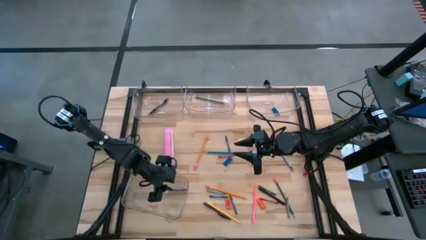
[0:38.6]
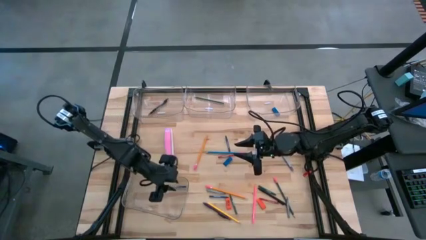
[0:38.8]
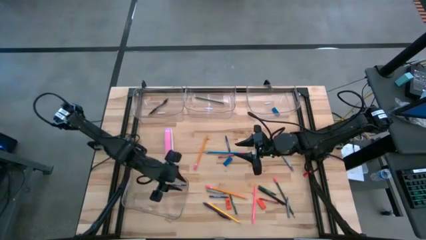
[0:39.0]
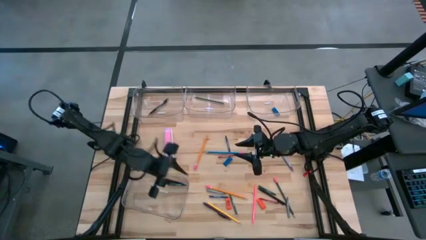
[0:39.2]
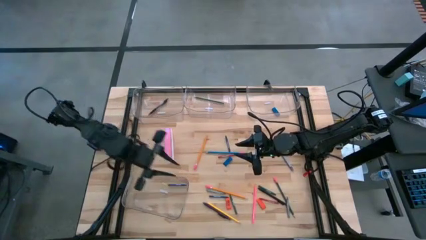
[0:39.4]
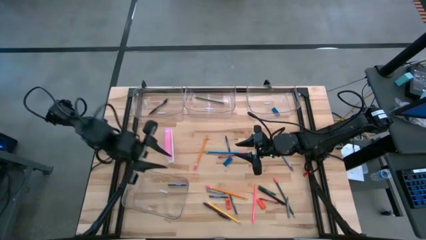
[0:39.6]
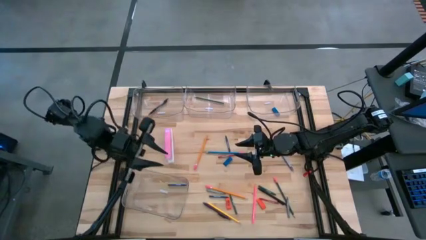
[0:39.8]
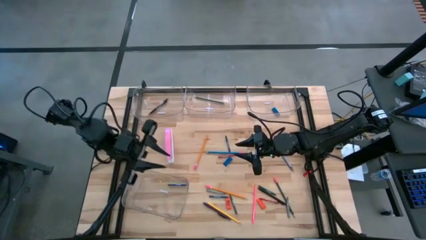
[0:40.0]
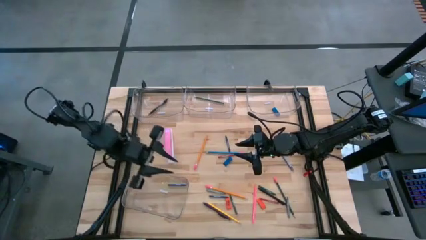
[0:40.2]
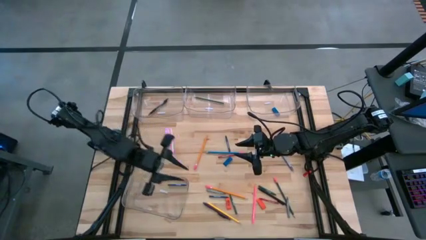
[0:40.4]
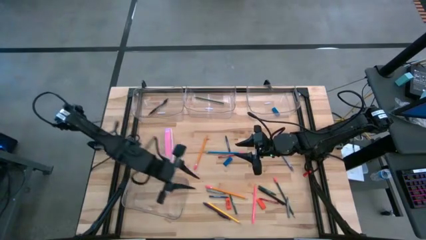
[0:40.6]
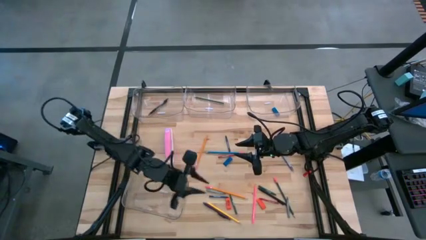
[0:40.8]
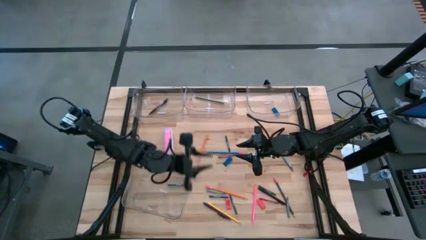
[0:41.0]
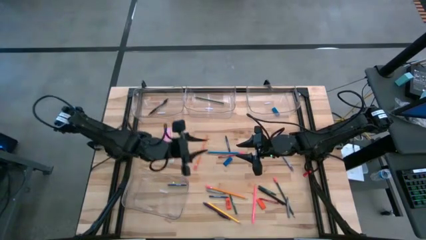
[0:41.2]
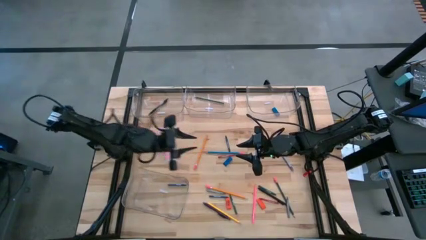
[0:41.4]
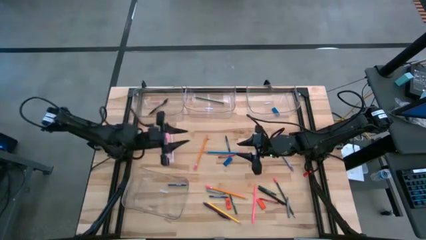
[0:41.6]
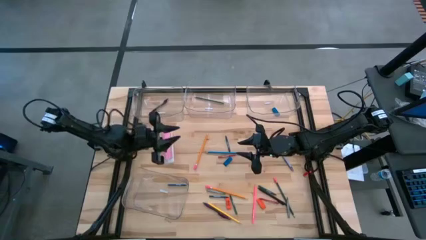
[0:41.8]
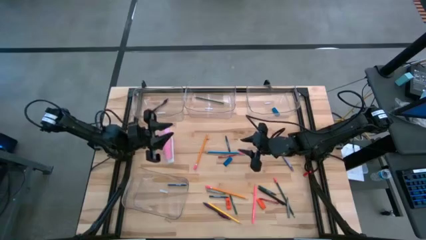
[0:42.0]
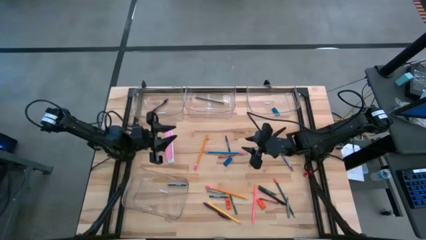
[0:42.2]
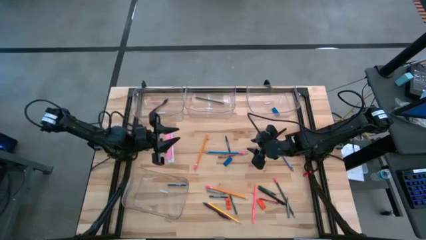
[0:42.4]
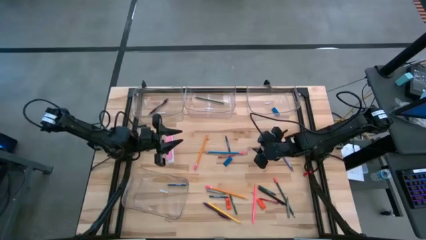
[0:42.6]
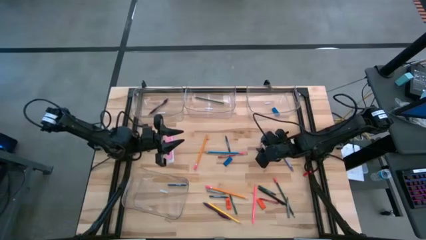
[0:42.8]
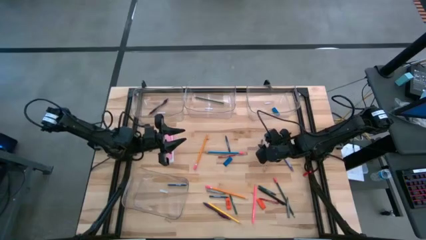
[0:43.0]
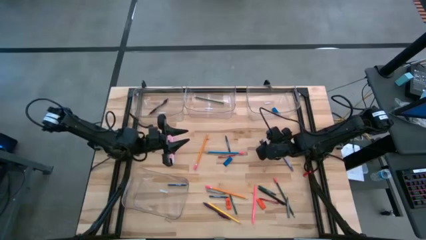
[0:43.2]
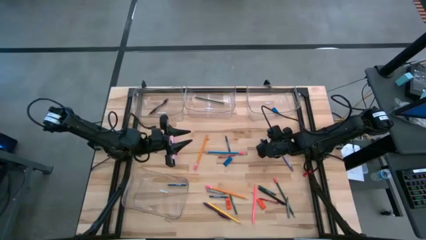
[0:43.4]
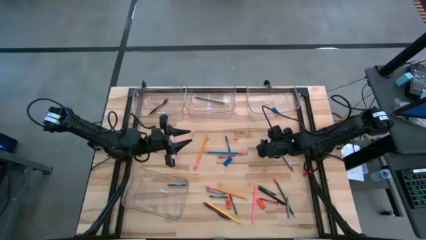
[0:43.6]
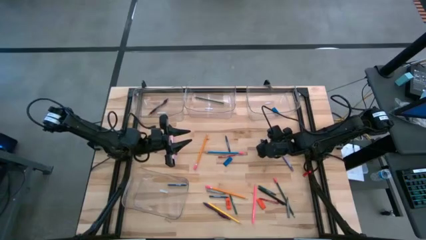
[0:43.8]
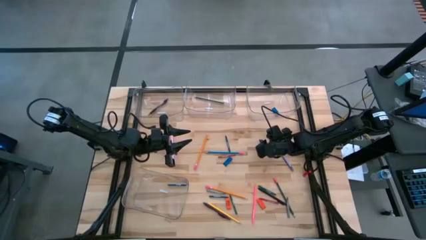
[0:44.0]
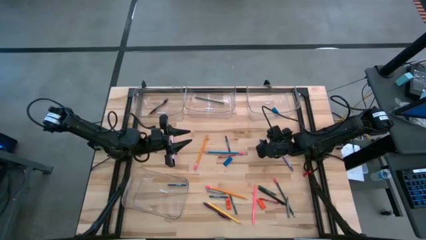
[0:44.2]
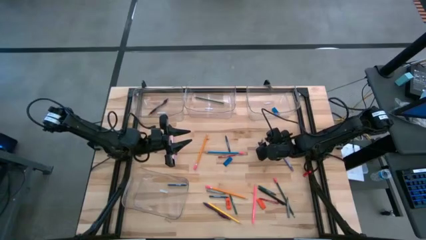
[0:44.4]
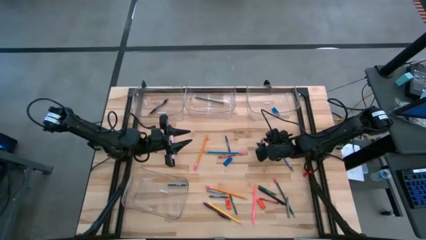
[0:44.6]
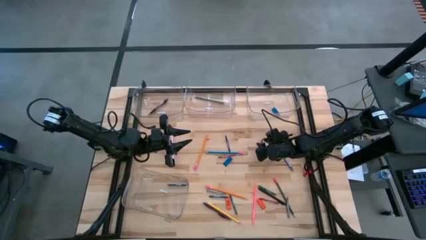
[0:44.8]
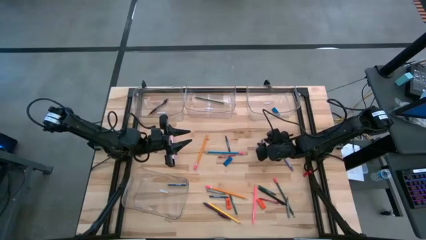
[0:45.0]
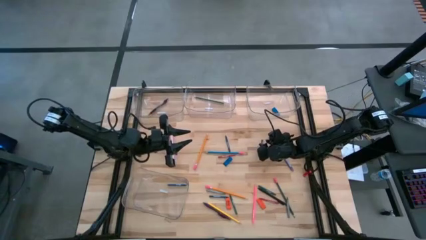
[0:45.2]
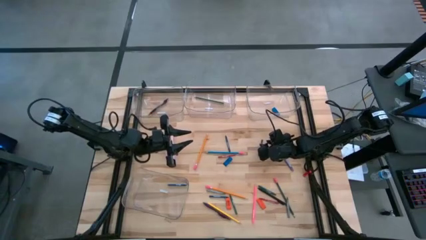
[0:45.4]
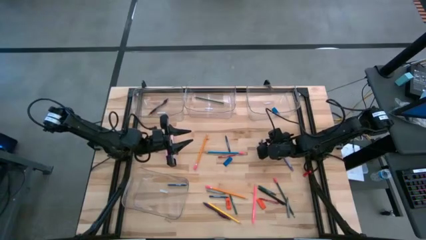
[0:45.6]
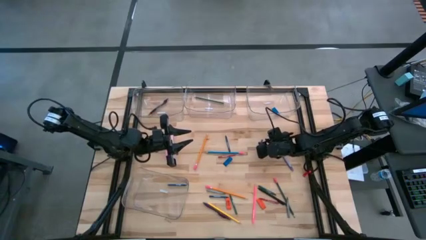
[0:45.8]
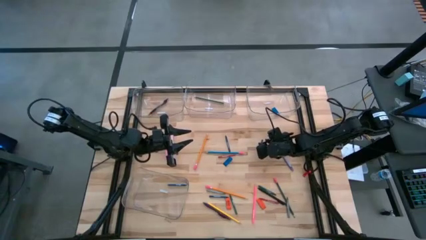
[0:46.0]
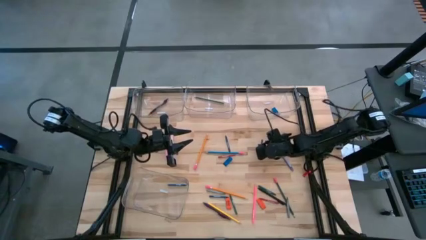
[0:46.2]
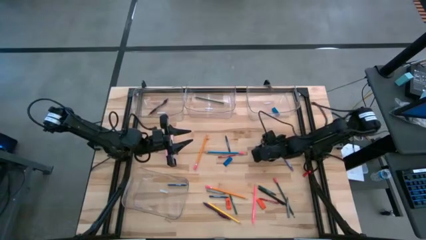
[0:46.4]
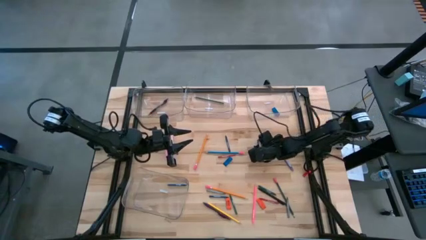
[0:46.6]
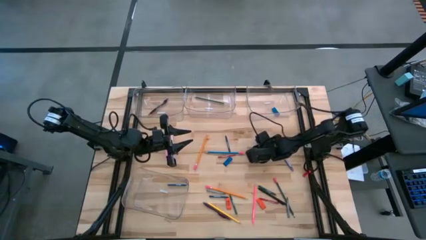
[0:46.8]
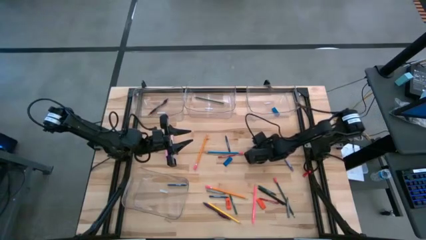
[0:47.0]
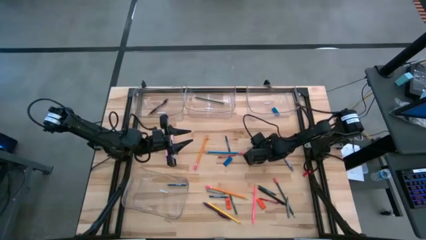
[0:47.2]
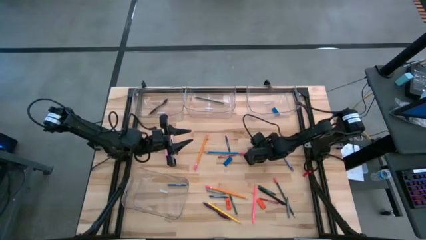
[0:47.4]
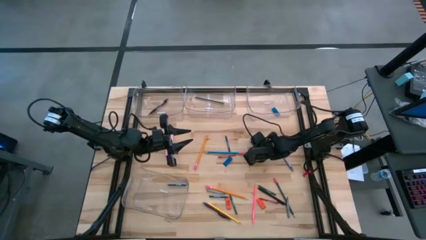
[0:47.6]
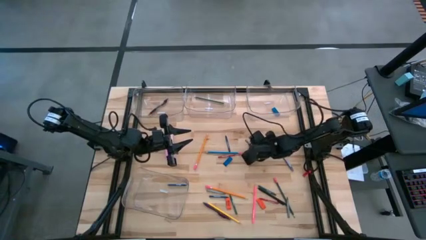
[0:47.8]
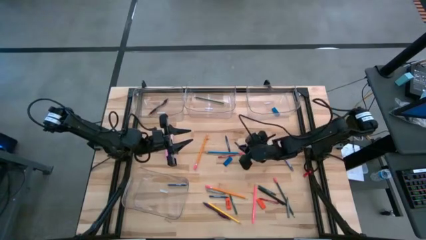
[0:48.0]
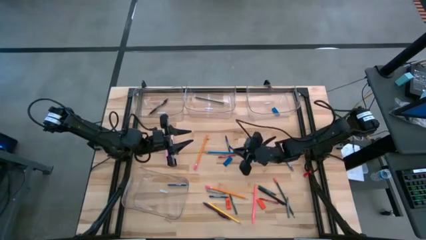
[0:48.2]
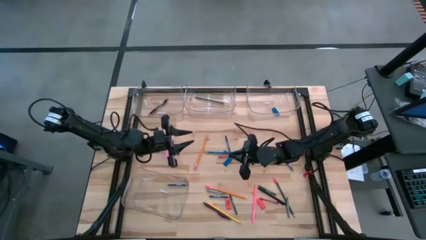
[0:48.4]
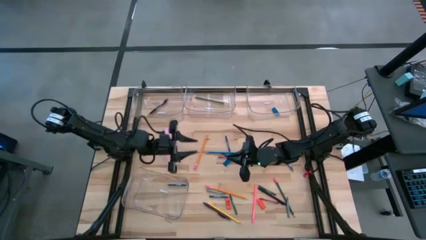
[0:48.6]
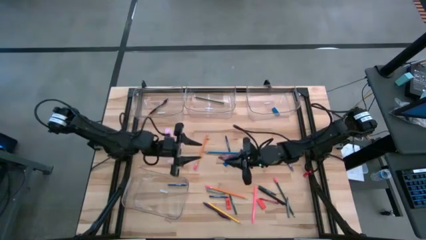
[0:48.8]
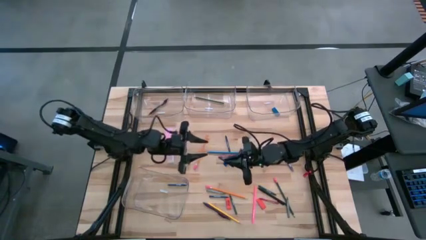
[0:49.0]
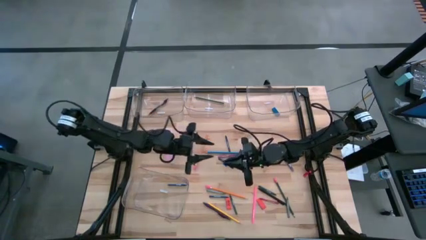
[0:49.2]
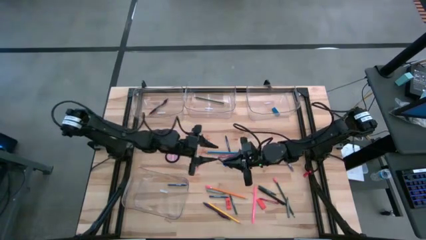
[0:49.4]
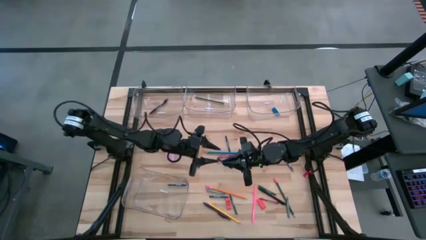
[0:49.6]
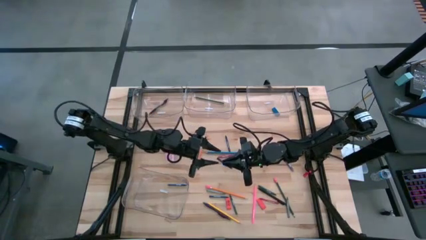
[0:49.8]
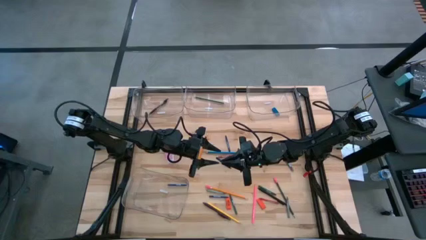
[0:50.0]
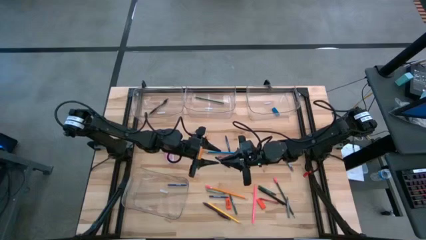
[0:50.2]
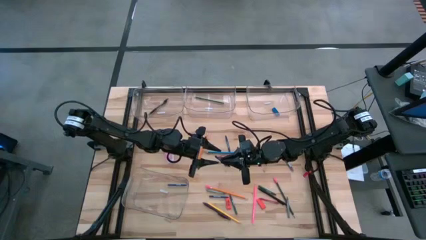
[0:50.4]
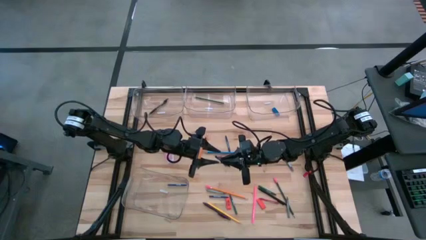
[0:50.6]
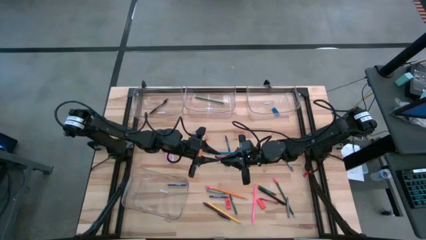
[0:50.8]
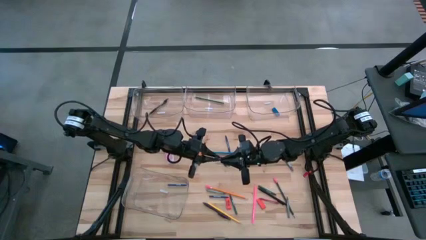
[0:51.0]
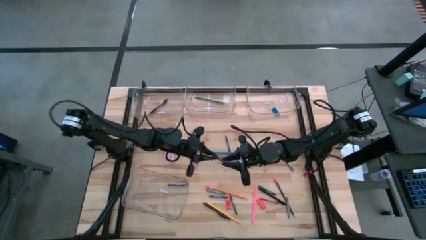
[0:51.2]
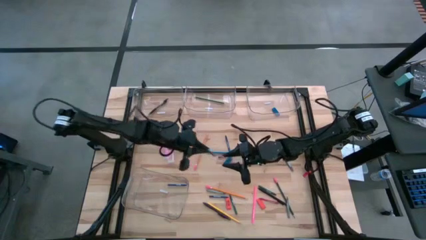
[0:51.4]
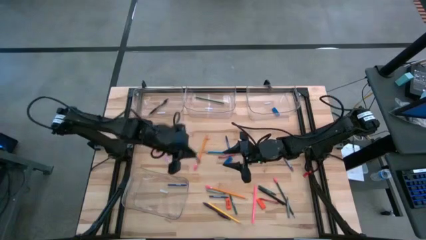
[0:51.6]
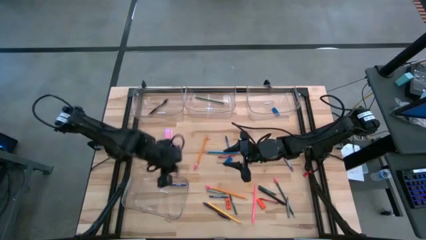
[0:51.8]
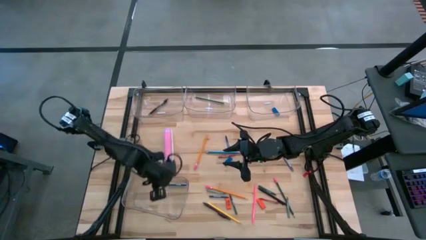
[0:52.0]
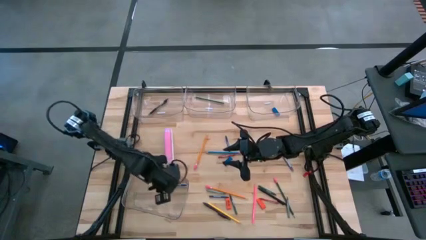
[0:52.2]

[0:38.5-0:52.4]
Task: Sort crayons/erasers/pens/pencils in bins
Put the blue crayon into the bottom left transparent bin

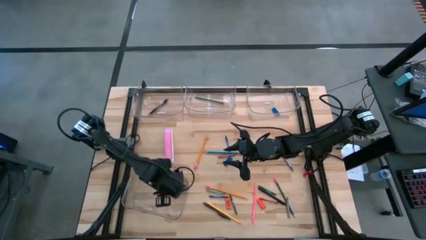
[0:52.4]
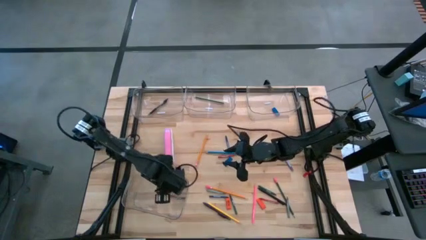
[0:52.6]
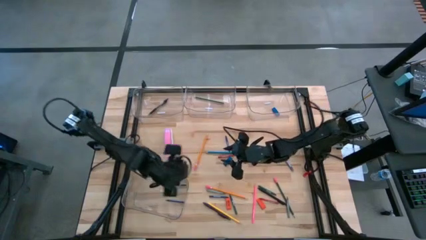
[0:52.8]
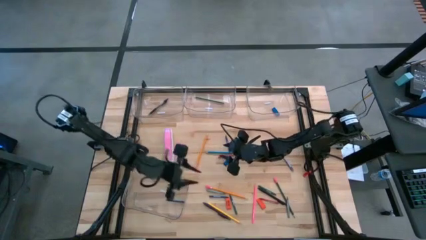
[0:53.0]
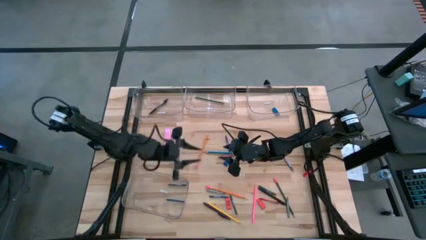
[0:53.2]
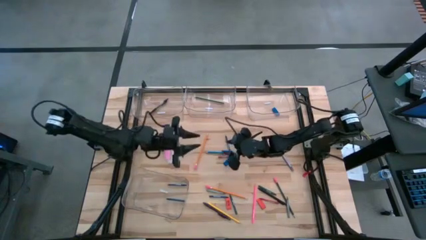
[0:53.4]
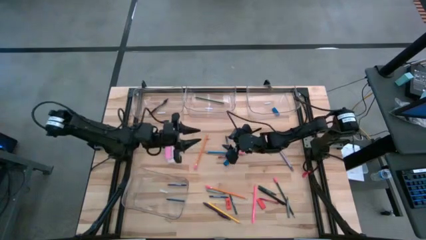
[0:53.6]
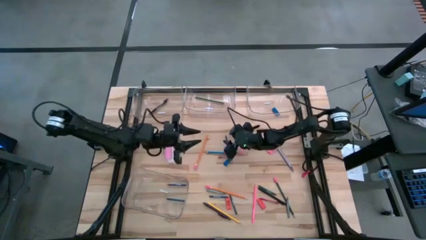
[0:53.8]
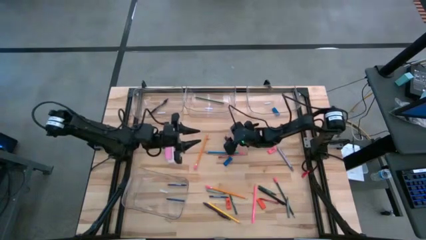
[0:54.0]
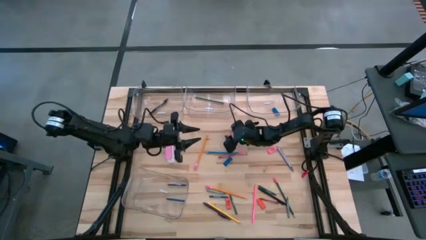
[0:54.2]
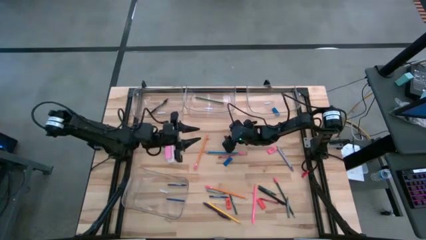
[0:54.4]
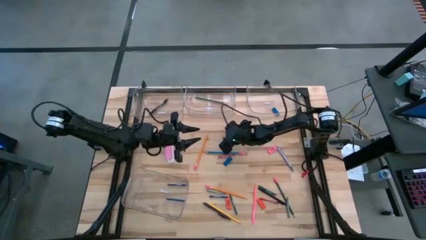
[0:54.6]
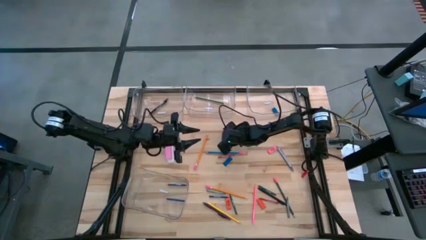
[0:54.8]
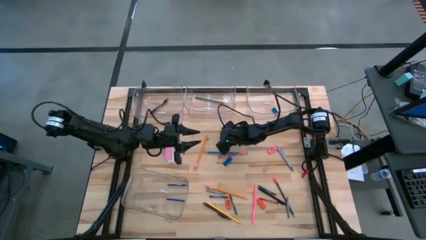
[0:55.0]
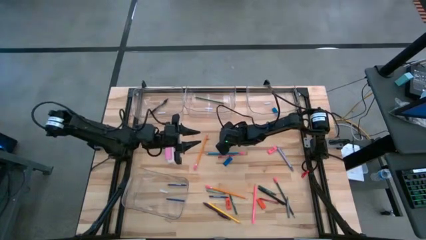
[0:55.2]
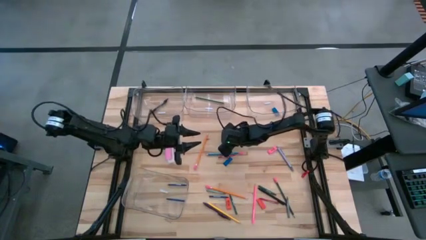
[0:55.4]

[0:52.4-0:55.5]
Put the blue crayon into the bottom left transparent bin
